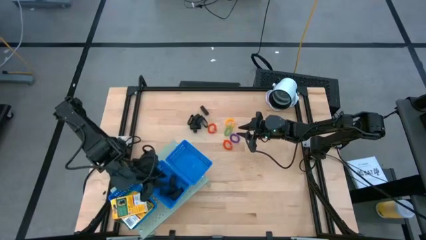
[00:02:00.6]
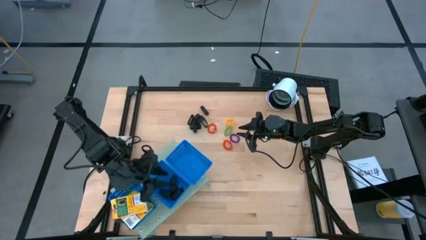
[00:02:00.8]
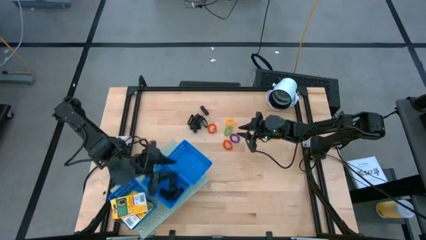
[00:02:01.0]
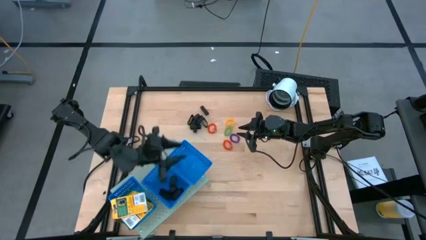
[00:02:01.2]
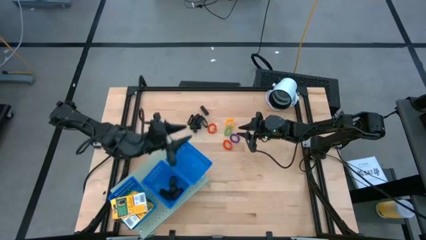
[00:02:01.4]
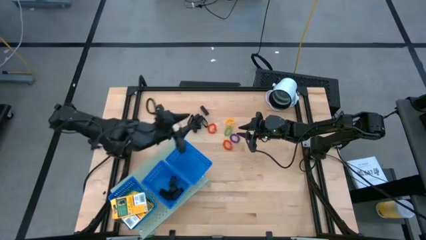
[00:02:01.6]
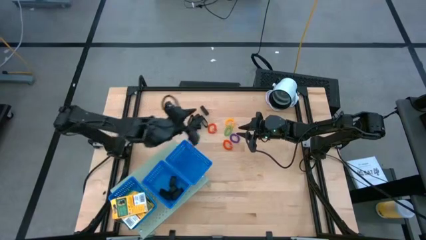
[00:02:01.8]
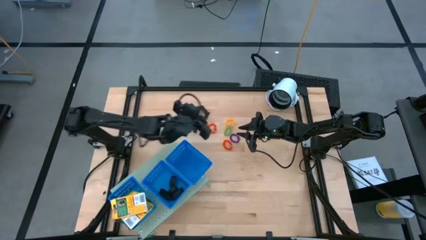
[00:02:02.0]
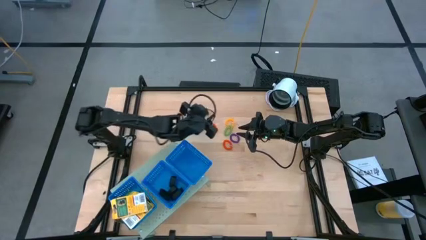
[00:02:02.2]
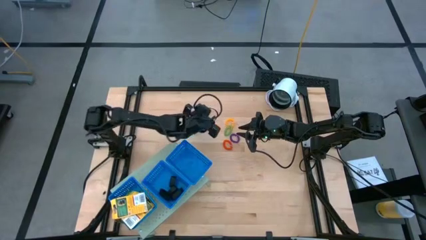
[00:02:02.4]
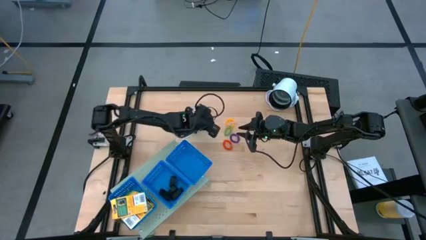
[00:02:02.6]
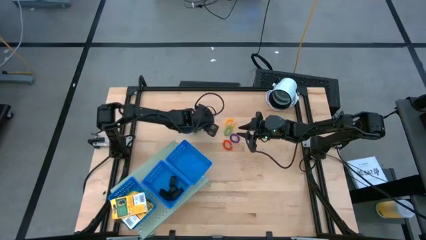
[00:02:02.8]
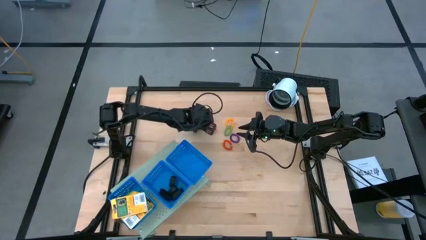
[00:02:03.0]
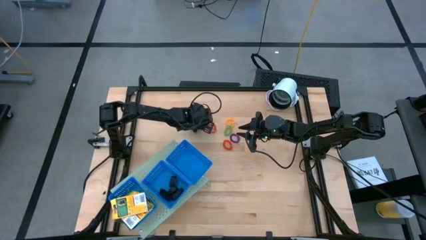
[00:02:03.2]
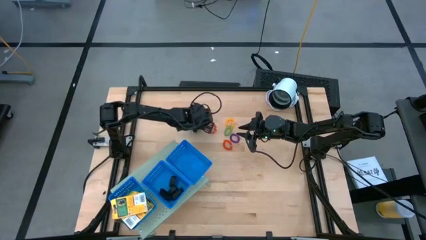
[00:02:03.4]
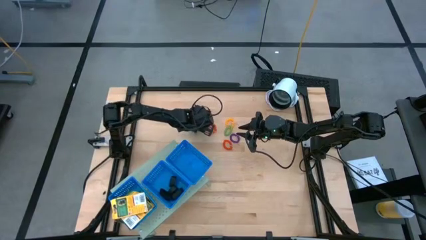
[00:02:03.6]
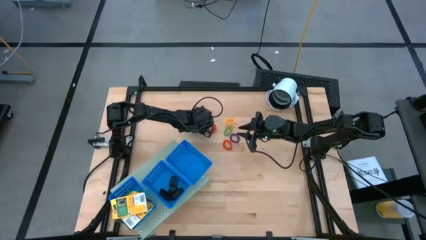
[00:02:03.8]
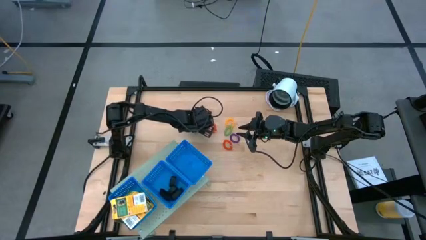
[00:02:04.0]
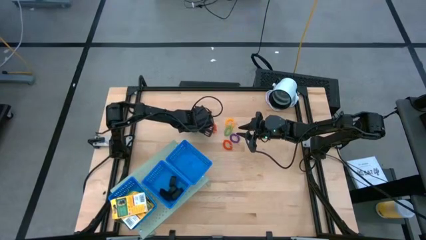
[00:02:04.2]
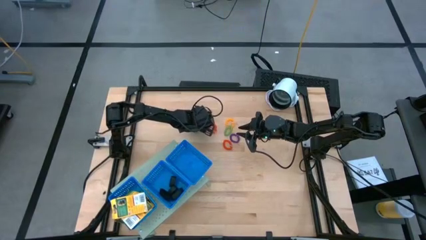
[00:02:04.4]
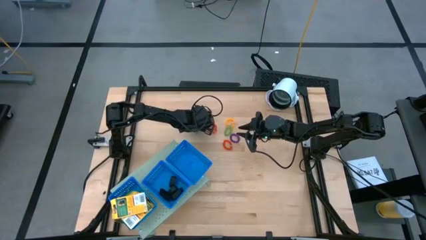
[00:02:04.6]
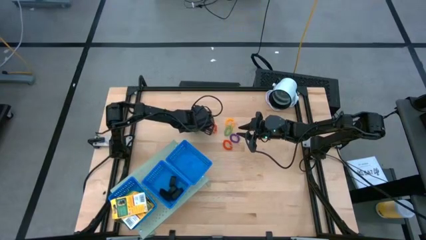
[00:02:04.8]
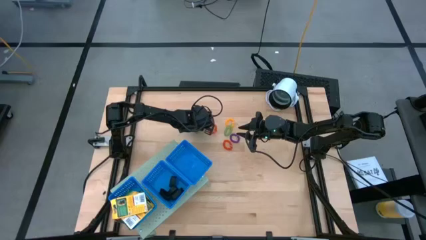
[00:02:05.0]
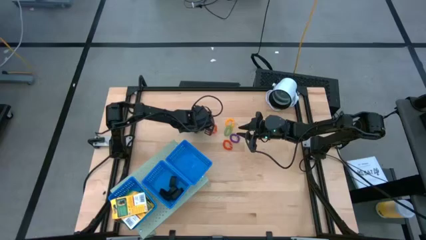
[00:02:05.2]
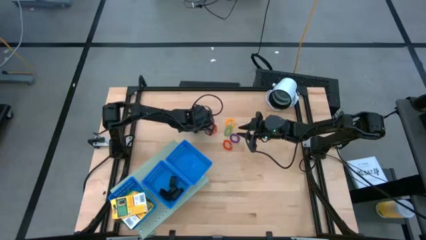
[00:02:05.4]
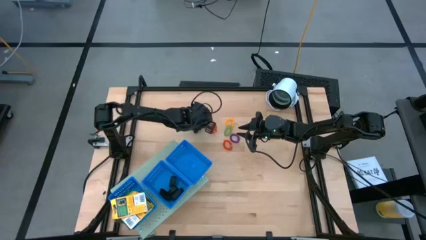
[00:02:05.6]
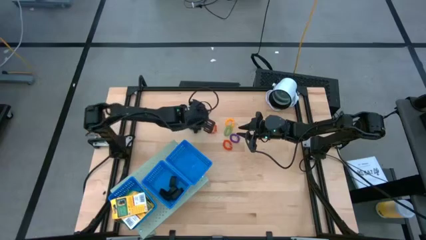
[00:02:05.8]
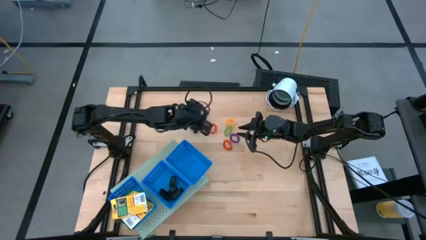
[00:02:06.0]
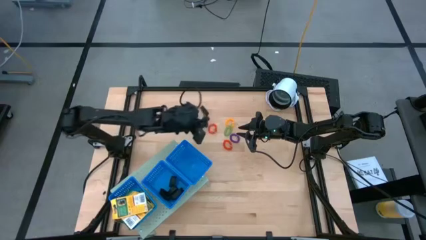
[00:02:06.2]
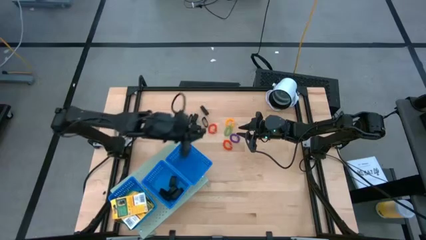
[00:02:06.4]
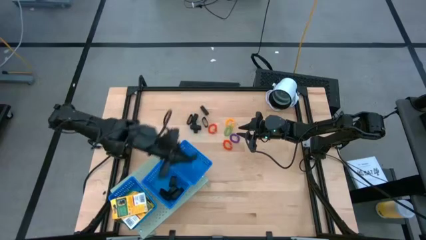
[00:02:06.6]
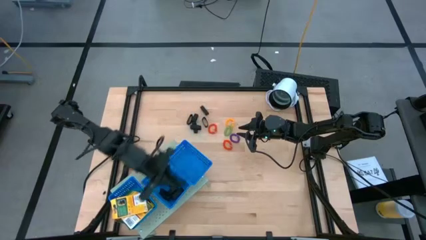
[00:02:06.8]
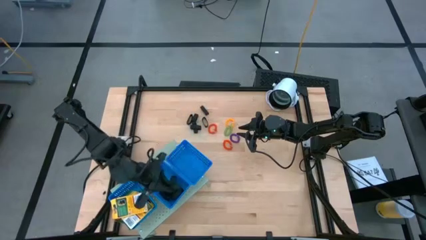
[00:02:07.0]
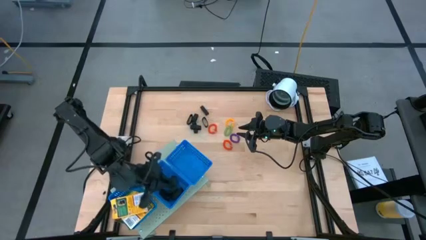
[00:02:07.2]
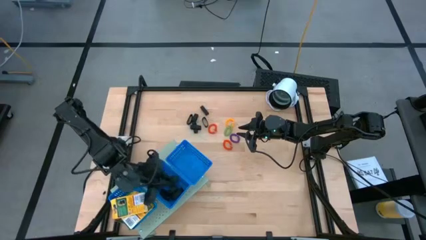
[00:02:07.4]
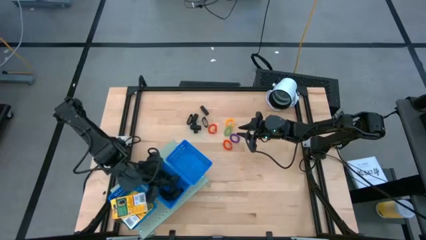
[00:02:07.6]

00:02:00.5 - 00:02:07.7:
Task: Pick & Place Office Desk Supplies
Put the black rubber band into the center blue basket on the shelf

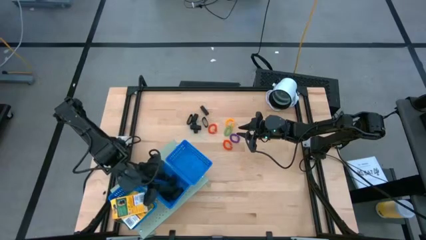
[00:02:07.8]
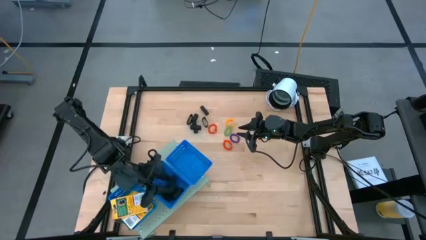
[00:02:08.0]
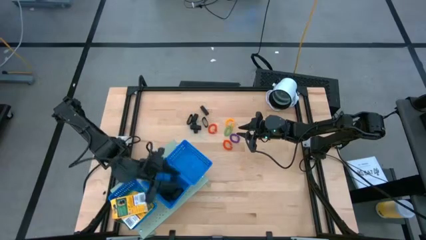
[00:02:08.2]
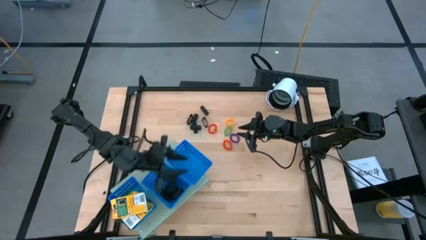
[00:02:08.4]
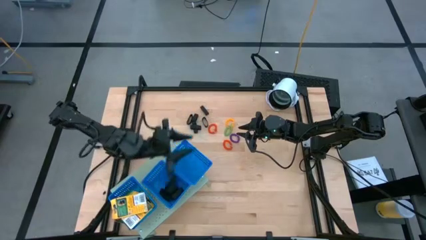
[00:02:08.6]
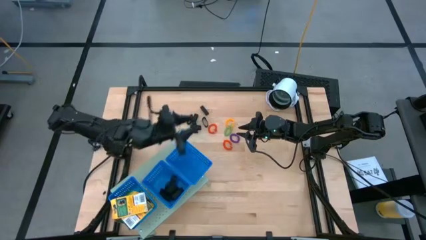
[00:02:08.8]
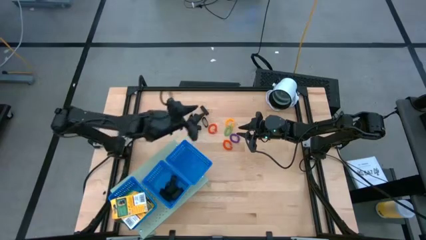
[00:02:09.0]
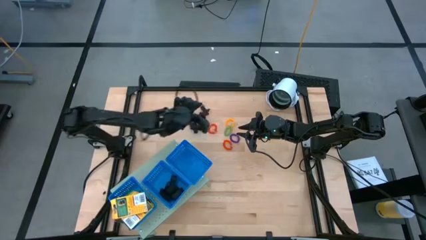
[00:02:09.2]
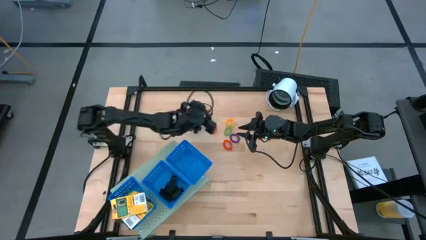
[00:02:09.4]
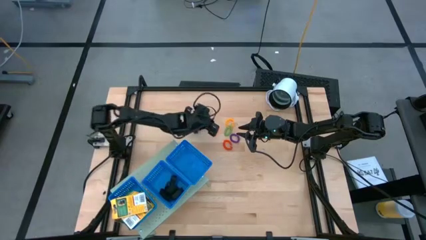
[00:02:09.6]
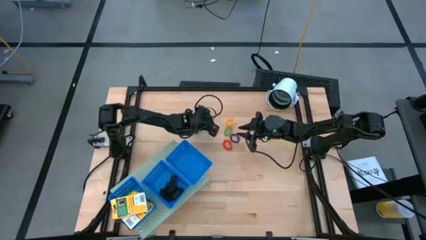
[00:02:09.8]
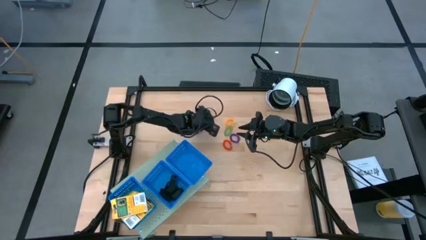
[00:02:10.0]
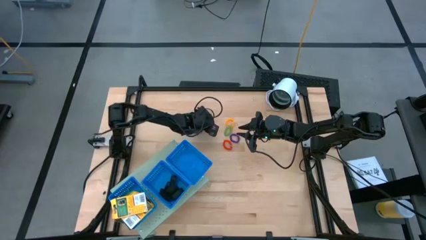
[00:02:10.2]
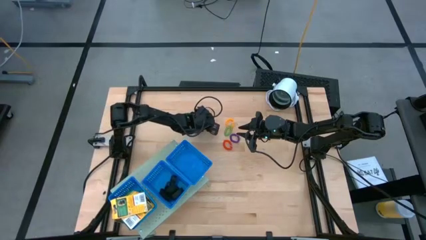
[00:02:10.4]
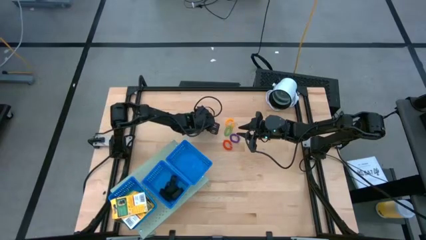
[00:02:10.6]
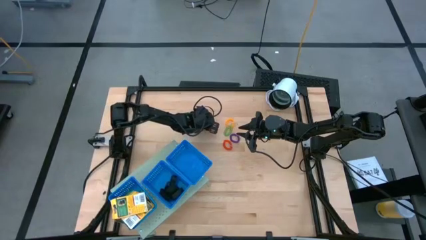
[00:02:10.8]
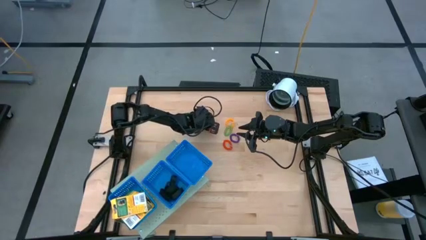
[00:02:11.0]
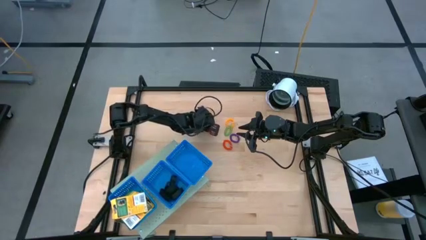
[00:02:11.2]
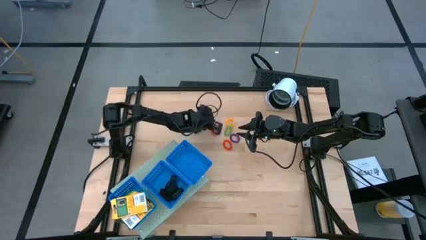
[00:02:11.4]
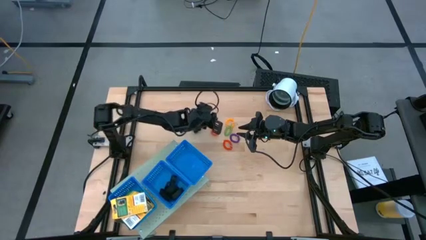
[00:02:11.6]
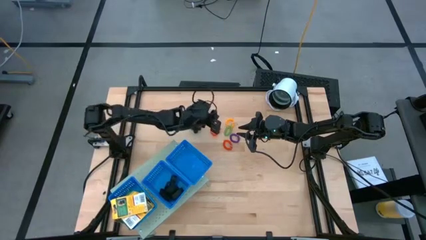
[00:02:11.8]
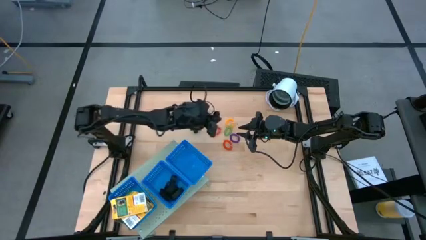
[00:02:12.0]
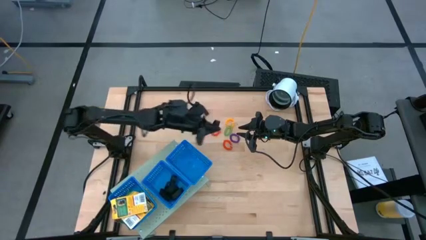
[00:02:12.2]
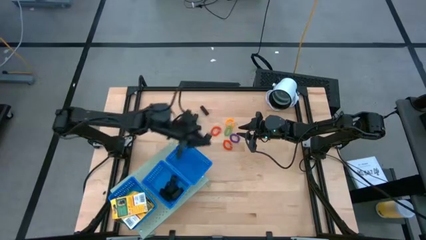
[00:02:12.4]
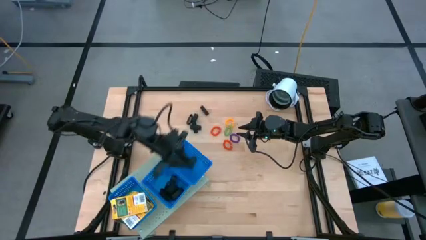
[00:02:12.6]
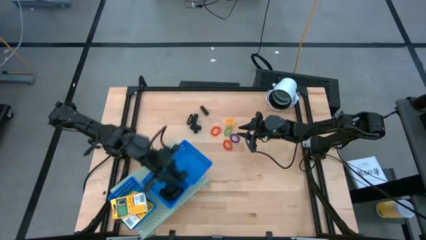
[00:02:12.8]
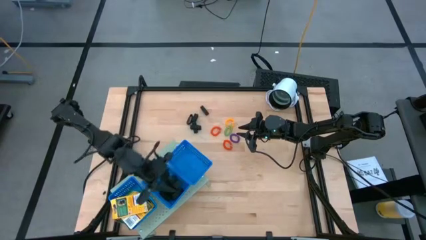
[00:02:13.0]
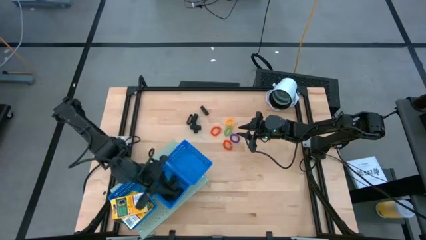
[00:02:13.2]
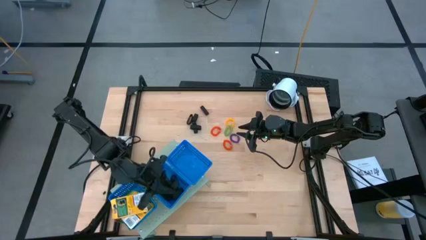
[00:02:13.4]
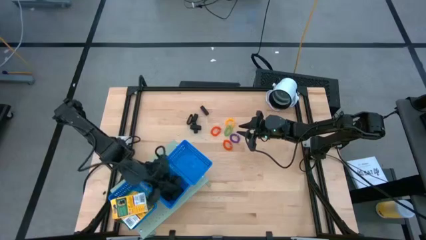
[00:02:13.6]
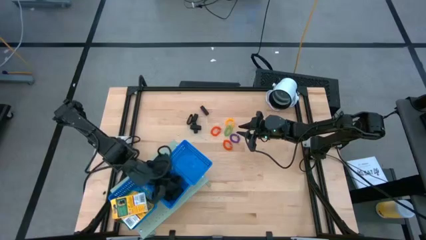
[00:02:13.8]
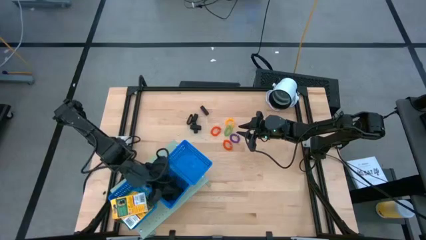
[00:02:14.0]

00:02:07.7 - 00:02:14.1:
Put the black rubber band into the center blue basket on the shelf

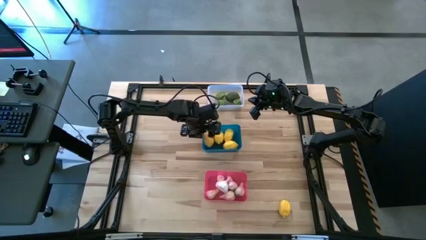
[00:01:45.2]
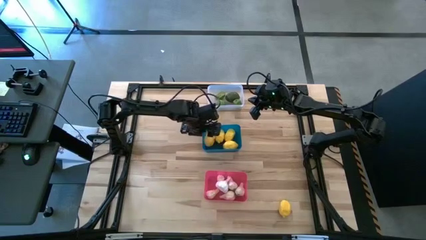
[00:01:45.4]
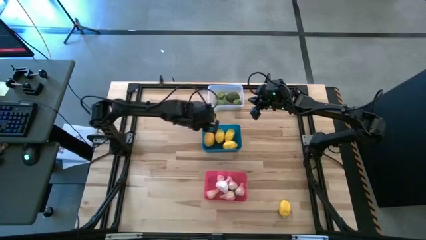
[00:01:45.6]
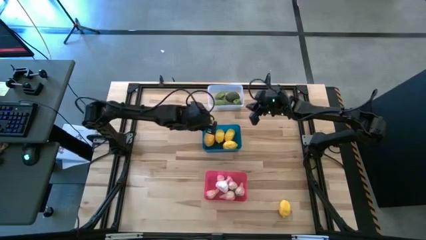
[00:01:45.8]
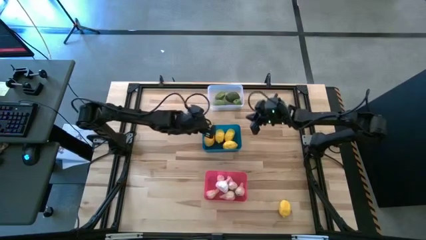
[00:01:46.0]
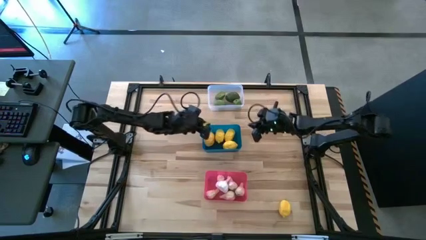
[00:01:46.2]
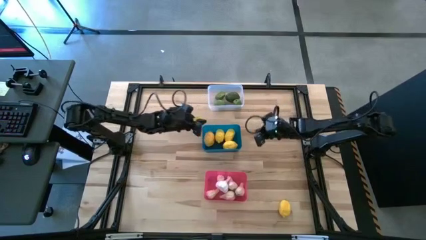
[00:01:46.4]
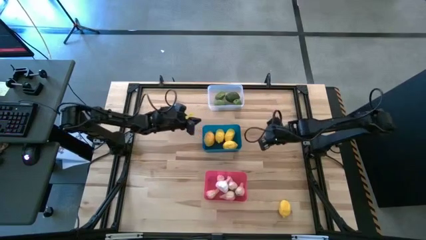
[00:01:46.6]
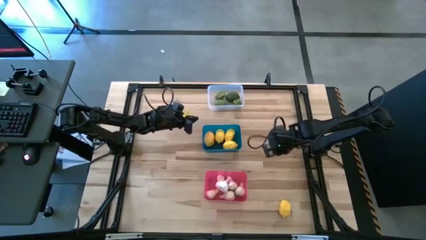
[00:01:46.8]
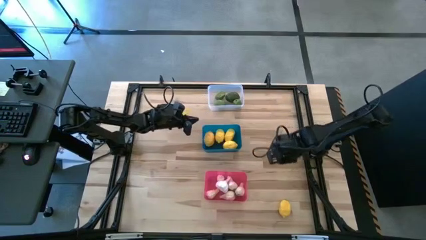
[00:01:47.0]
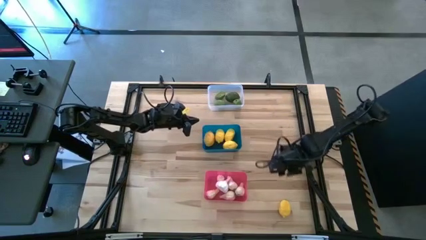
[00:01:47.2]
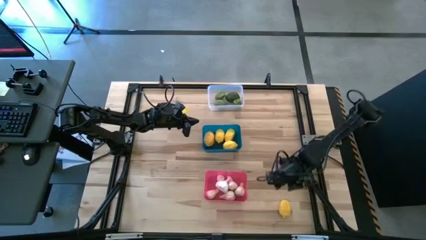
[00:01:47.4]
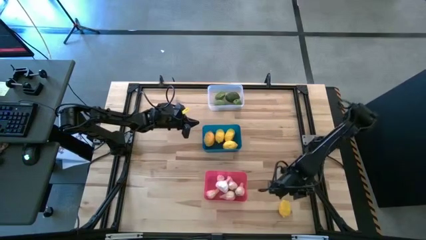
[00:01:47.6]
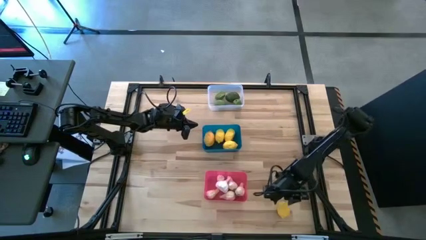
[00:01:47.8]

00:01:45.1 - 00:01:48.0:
Task: Sort produce into baskets
Put the yellow lemon into the blue bin
